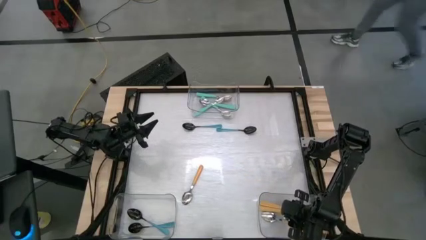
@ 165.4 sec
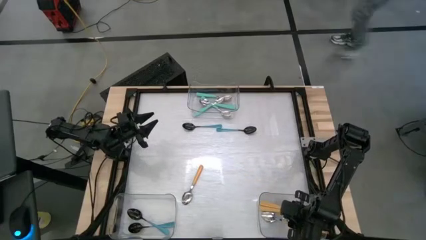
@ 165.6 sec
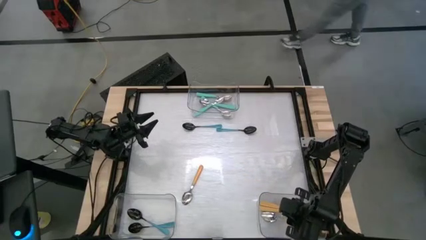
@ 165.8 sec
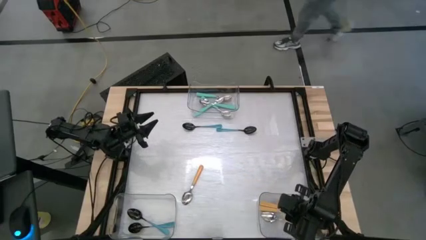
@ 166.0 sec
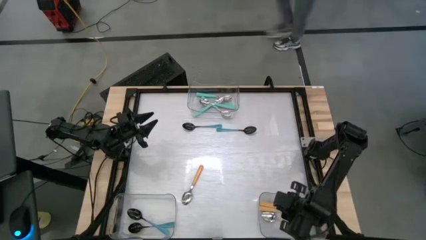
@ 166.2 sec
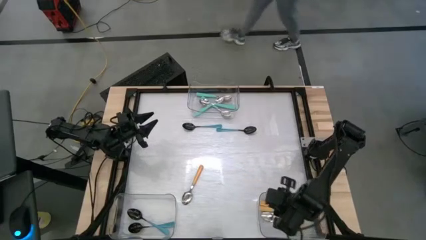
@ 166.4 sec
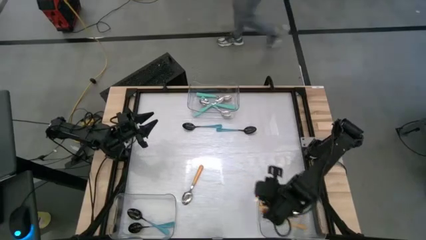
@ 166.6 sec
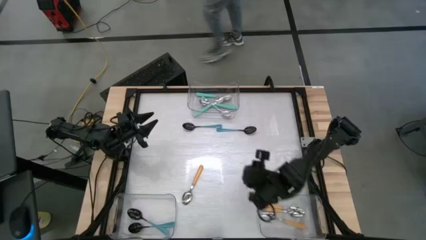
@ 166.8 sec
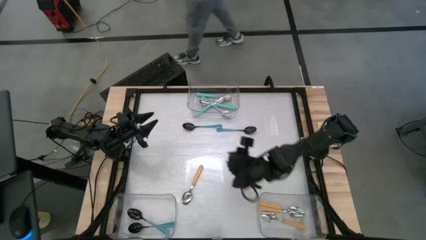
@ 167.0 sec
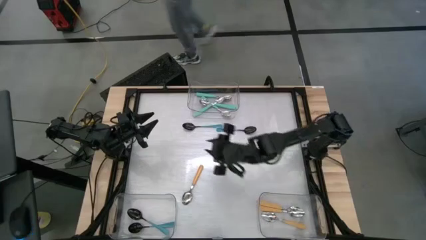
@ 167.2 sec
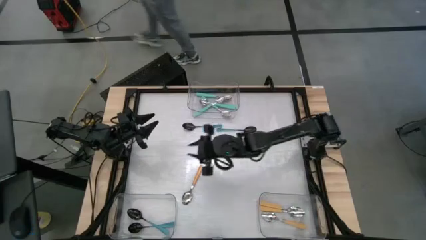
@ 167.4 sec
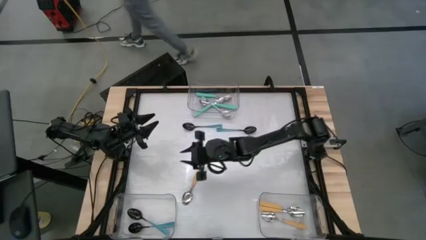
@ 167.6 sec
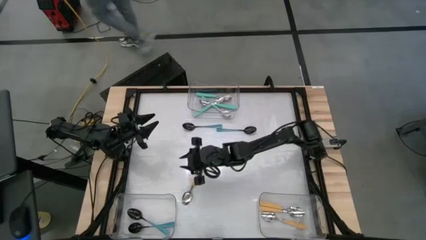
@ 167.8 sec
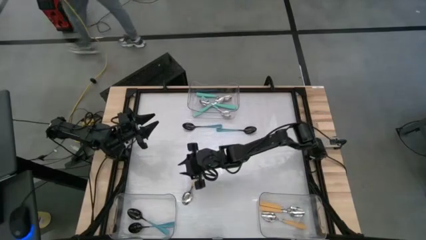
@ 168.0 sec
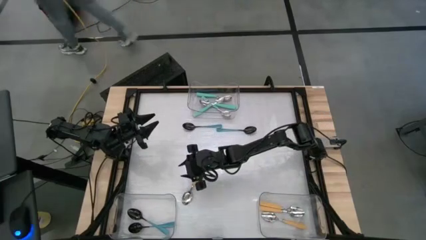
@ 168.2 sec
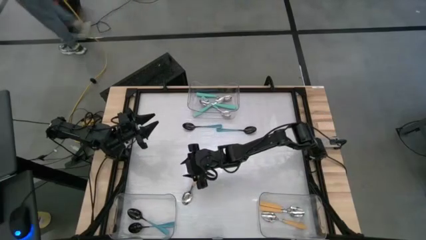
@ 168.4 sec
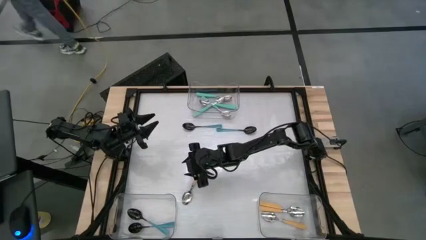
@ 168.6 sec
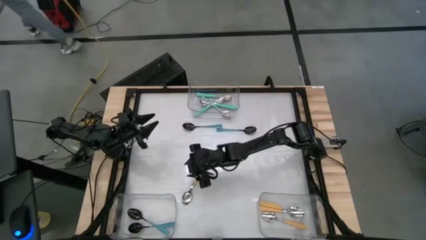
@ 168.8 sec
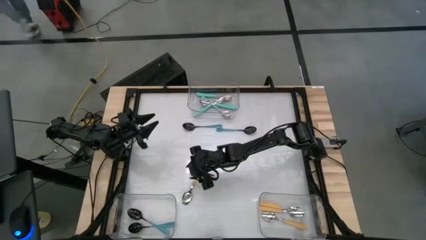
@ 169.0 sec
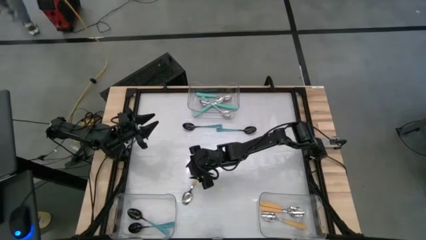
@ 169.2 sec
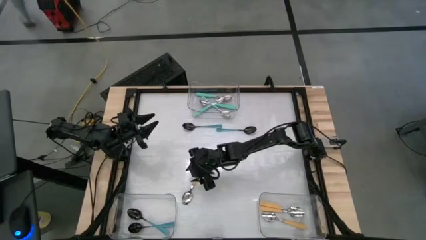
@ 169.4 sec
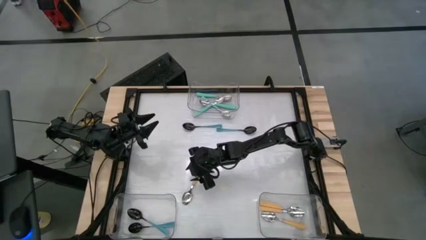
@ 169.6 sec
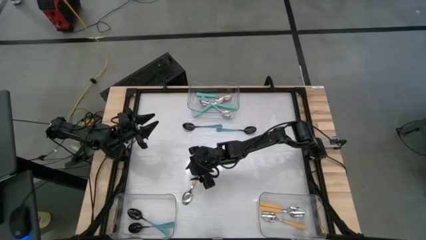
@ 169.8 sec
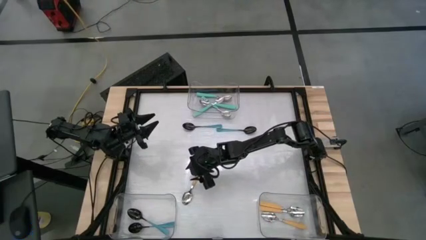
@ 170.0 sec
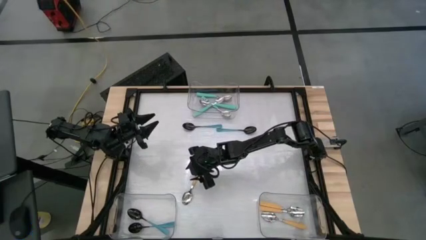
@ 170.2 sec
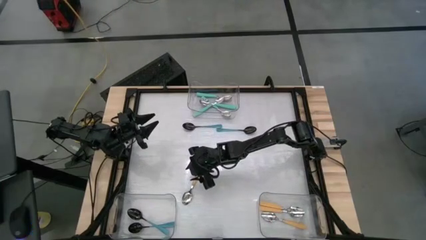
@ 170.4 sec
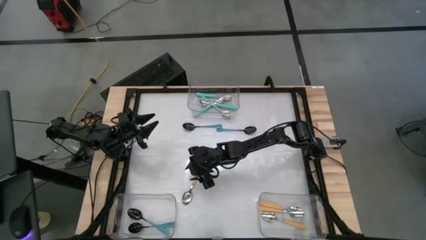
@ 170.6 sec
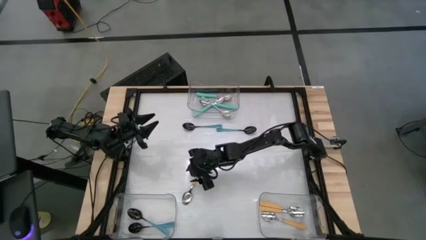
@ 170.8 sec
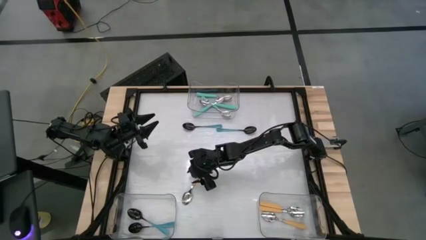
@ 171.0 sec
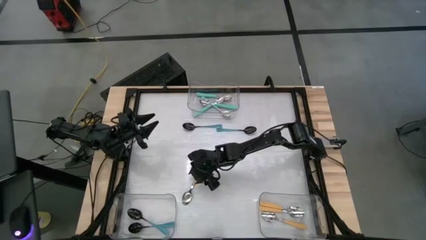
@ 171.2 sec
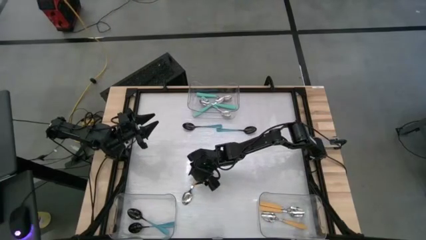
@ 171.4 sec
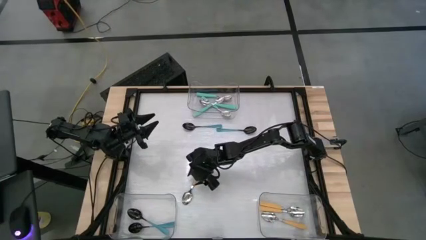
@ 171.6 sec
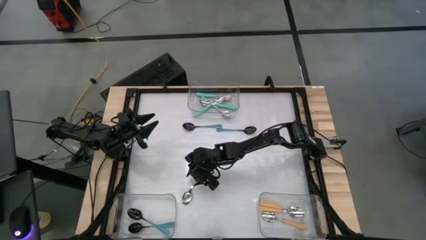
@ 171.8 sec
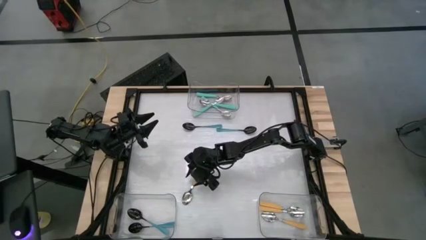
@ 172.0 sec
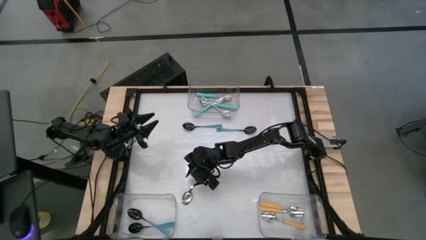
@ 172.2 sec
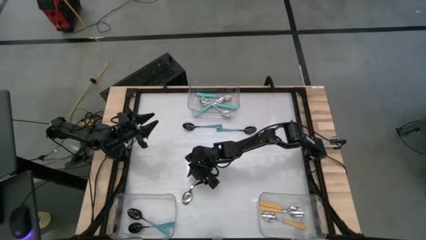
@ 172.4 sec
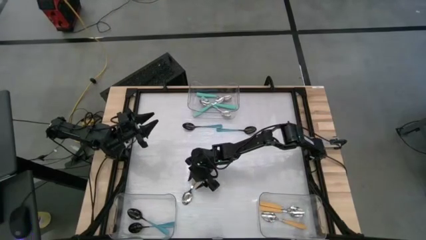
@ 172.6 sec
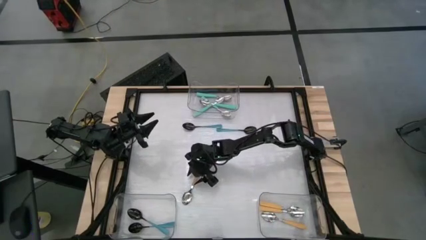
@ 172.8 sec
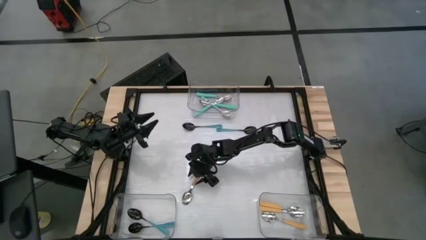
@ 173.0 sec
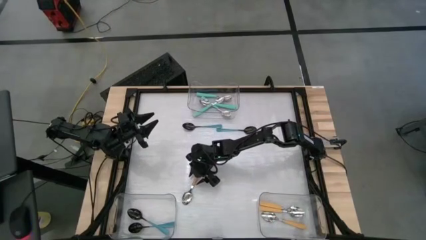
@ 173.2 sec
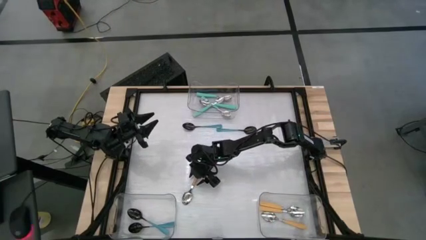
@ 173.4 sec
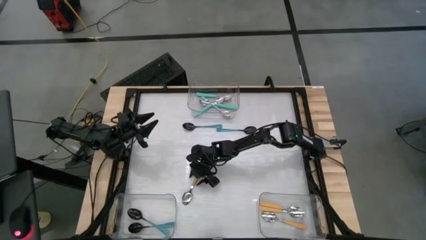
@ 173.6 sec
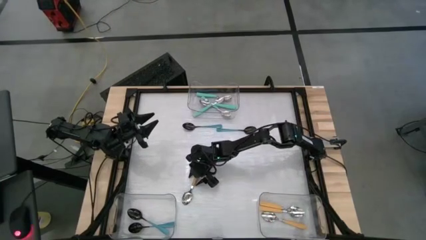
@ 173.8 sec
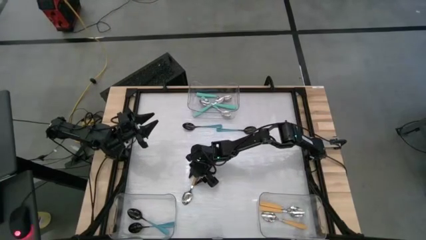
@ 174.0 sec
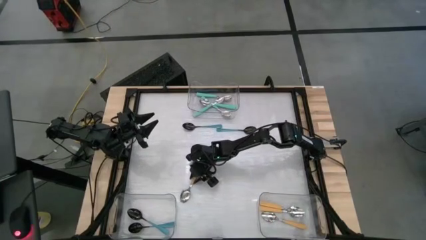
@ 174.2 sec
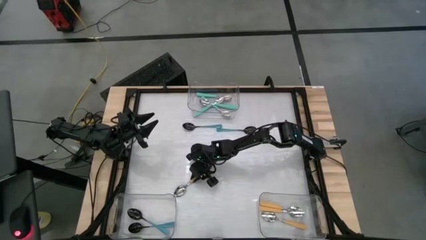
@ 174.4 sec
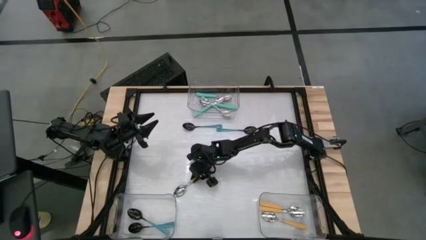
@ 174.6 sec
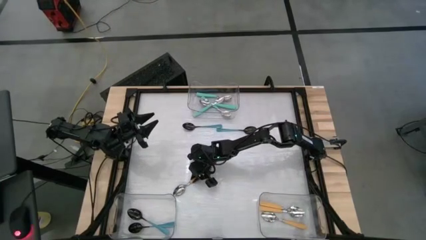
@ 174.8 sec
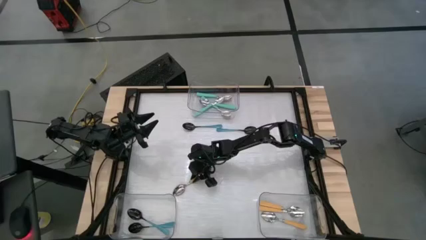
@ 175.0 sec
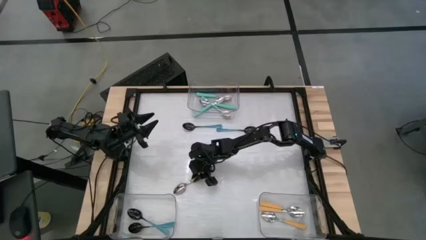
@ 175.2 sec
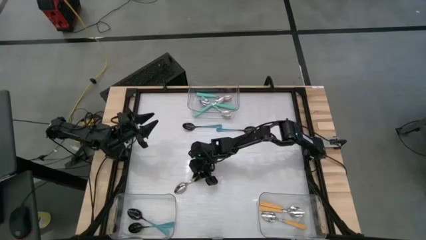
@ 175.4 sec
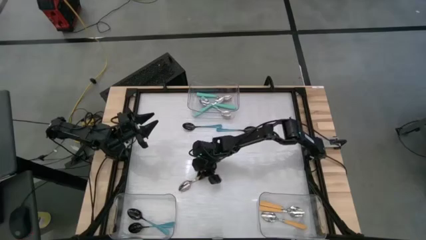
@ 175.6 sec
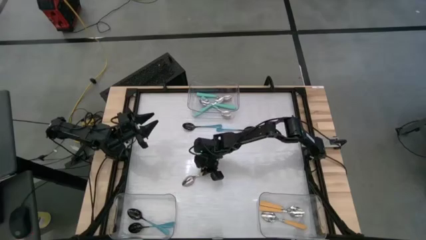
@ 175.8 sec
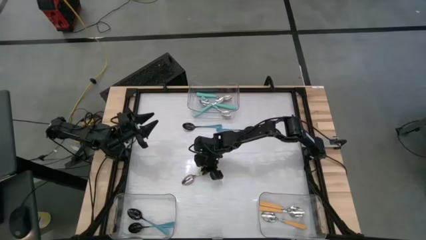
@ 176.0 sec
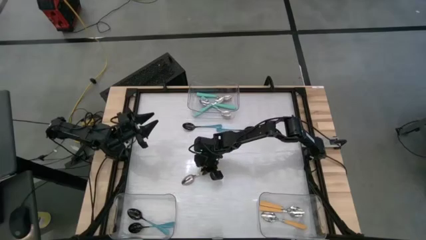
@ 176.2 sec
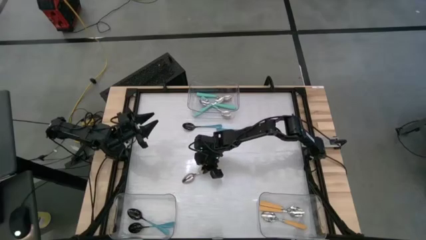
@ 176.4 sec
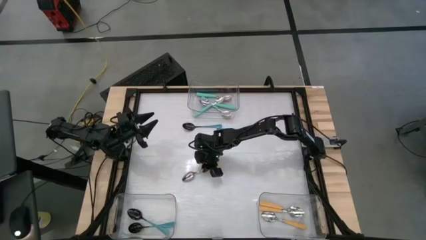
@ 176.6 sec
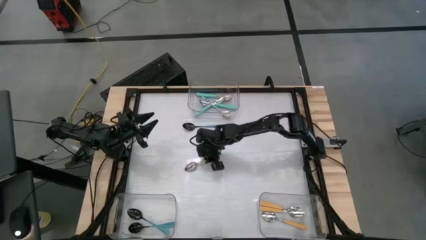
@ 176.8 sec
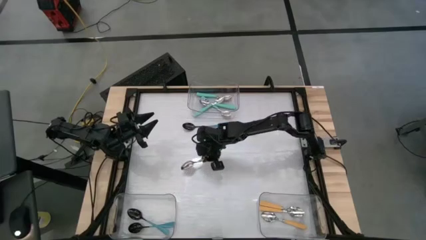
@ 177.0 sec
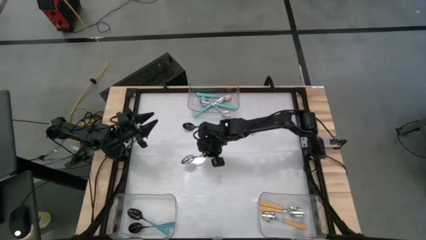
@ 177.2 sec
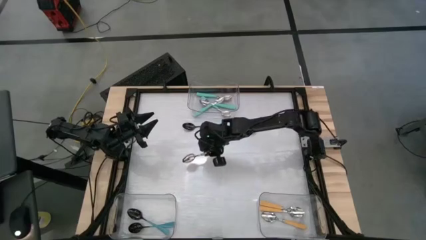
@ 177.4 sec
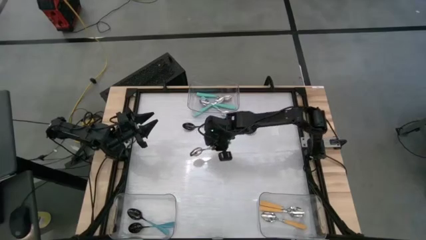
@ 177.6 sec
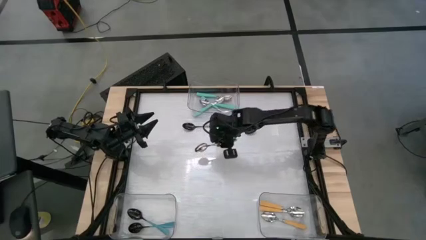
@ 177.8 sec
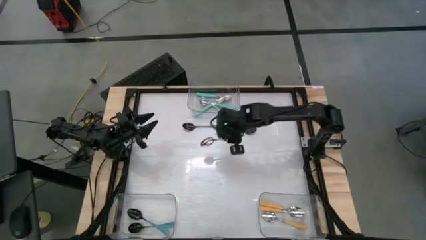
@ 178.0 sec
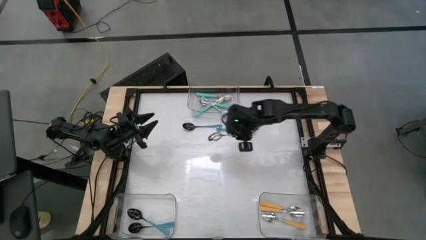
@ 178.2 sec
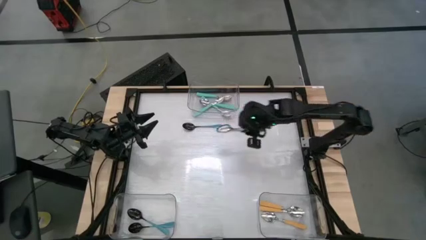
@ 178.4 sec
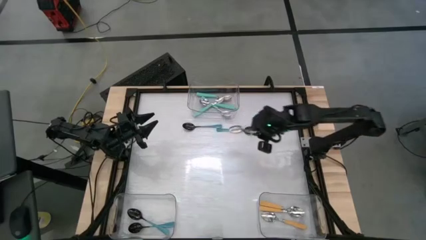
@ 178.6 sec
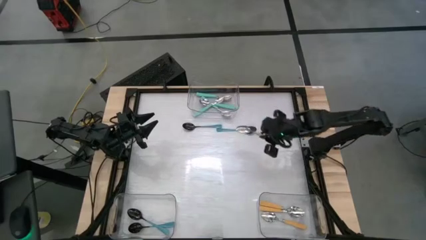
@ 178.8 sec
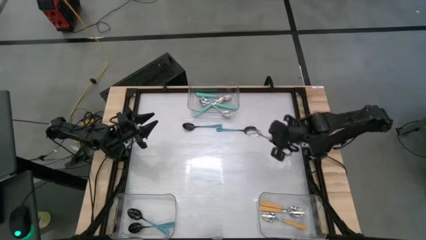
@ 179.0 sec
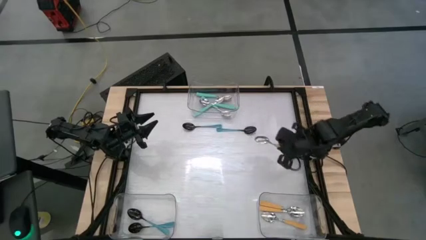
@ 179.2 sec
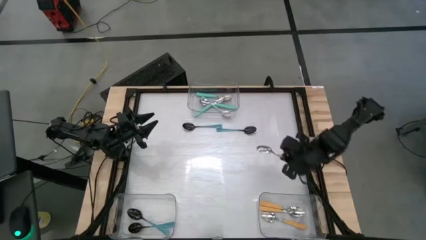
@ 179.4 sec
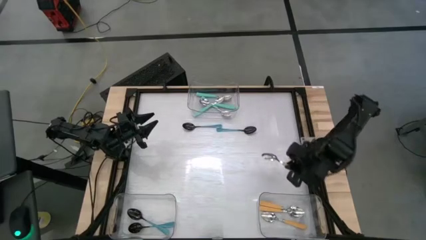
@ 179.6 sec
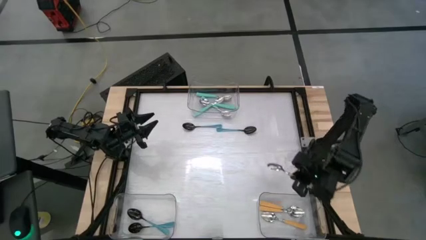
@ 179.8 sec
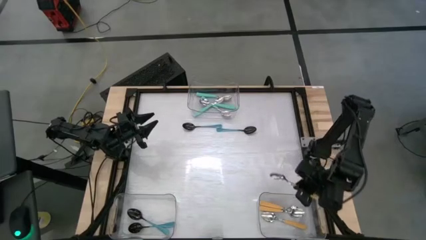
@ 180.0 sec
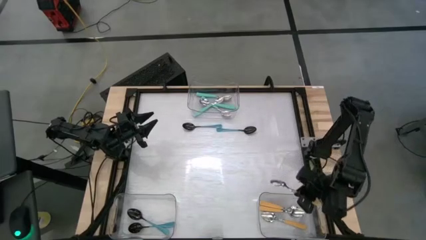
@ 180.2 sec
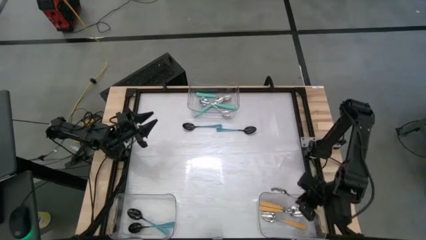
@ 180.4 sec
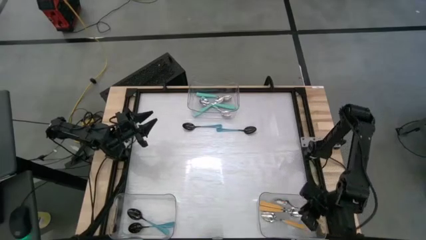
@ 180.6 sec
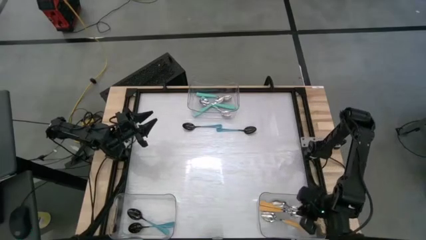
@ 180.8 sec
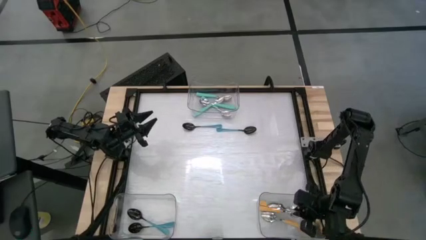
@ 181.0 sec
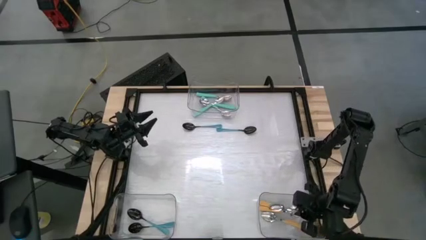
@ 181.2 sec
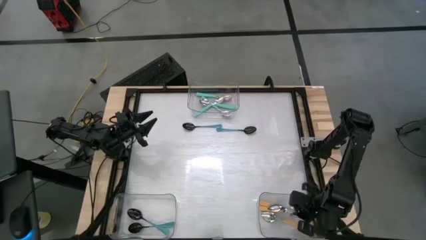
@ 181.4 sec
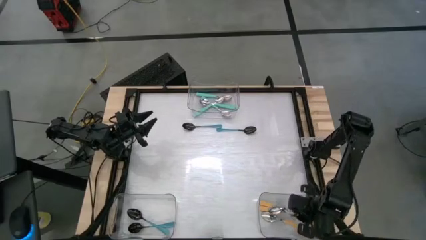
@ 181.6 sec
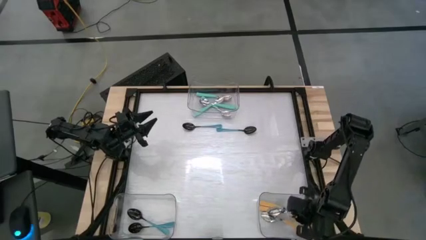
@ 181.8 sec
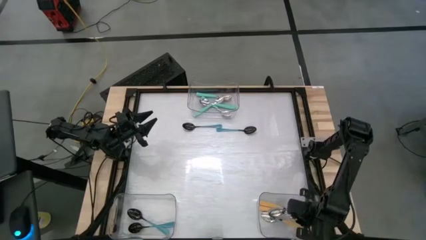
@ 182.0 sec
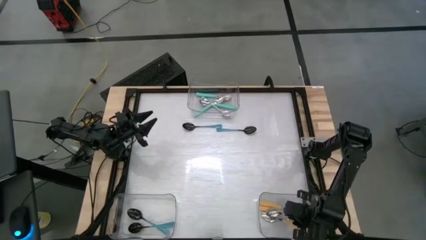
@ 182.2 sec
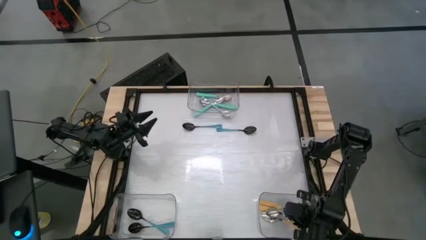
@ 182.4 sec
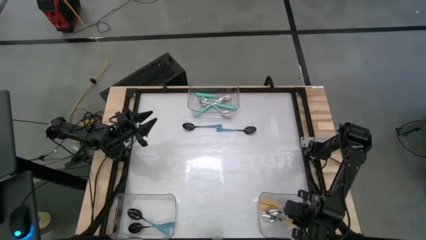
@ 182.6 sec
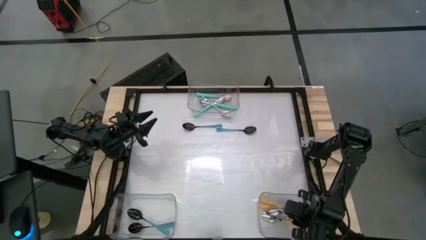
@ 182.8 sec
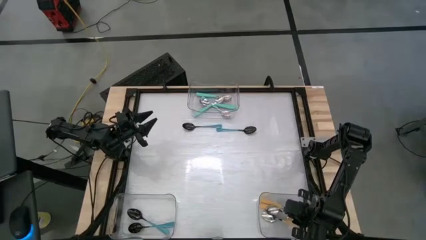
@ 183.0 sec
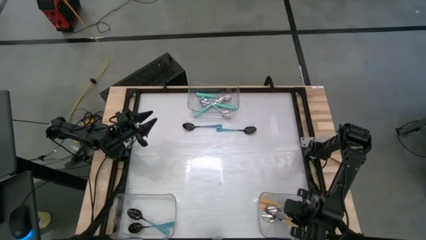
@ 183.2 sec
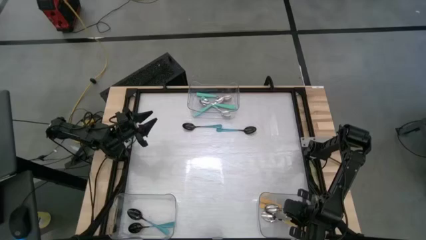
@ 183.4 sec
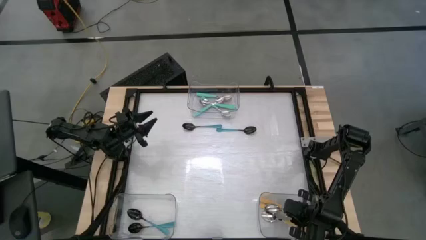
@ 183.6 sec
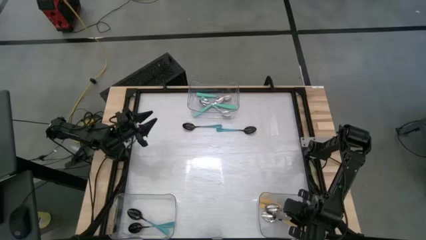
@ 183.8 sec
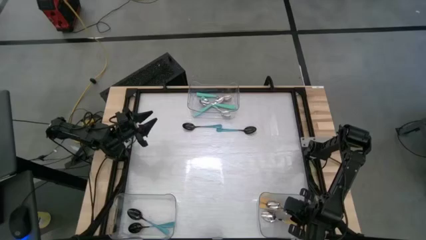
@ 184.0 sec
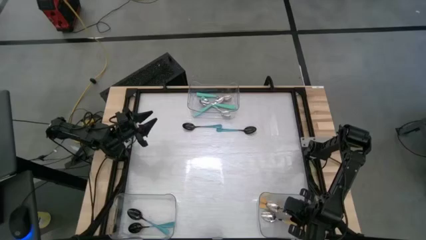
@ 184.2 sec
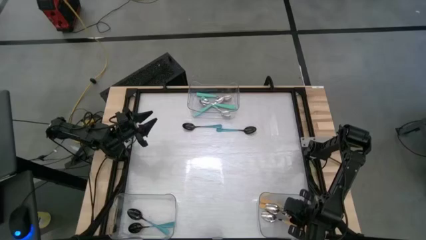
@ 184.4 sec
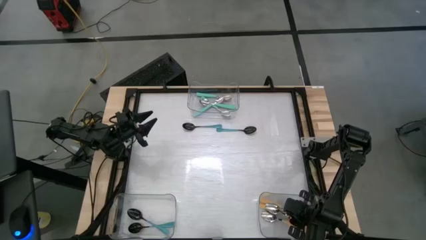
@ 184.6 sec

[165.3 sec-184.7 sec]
Task: Sort silverware by color (type)
Put the orange spoon into the bottom right transparent bin
